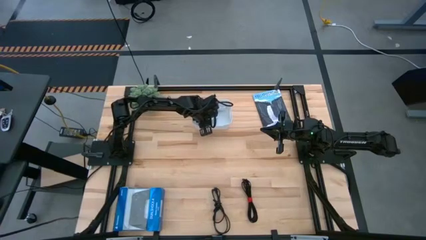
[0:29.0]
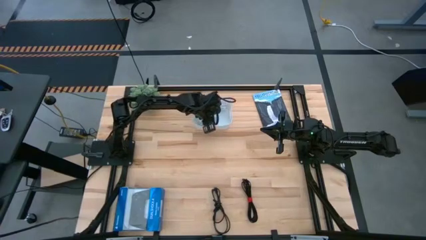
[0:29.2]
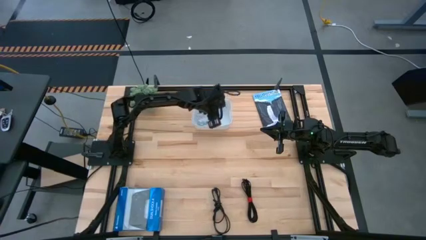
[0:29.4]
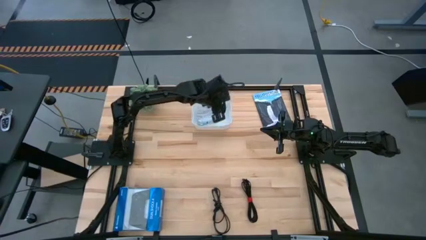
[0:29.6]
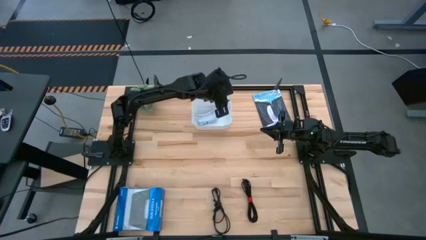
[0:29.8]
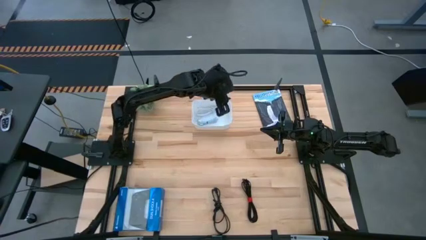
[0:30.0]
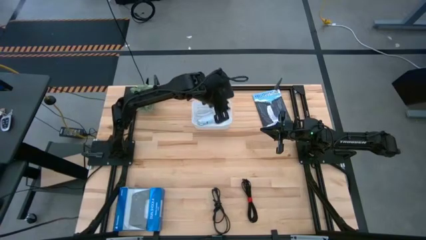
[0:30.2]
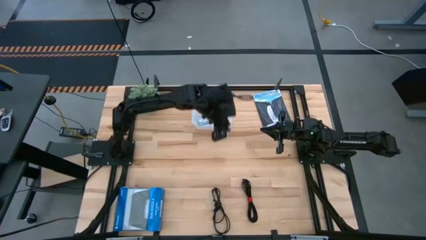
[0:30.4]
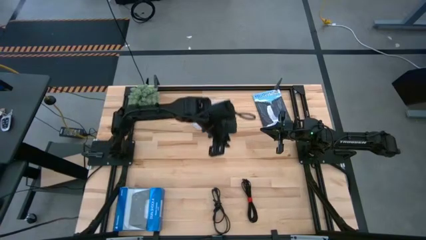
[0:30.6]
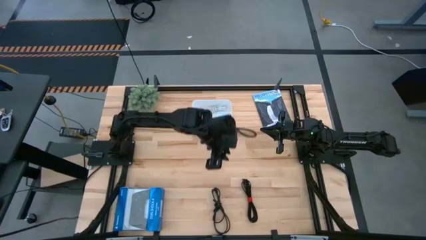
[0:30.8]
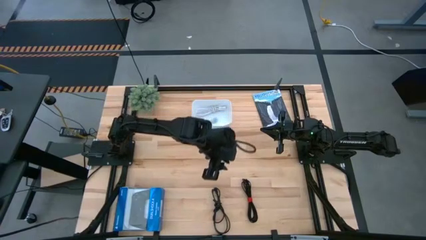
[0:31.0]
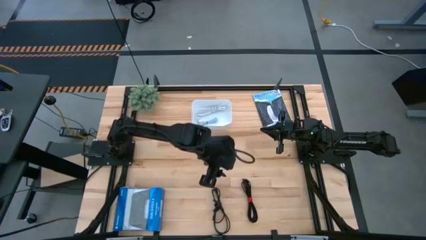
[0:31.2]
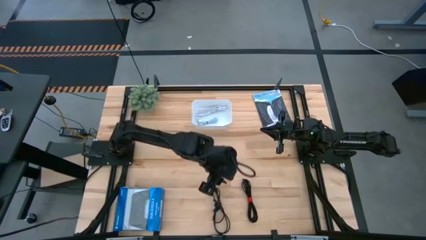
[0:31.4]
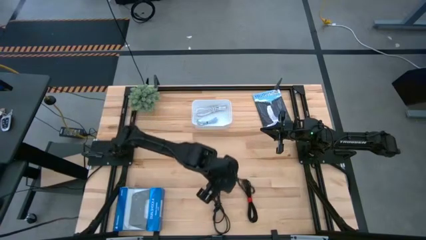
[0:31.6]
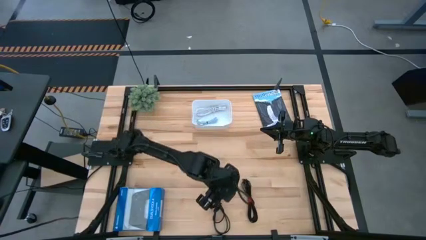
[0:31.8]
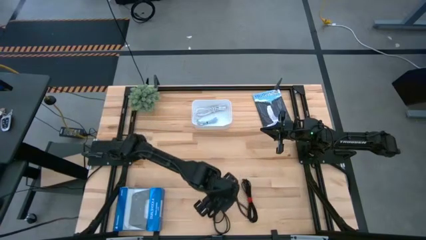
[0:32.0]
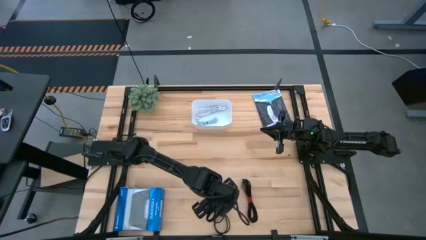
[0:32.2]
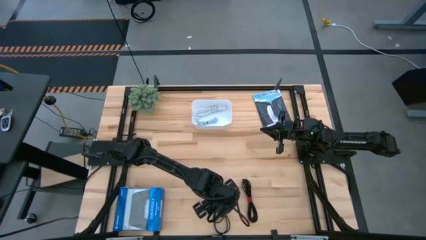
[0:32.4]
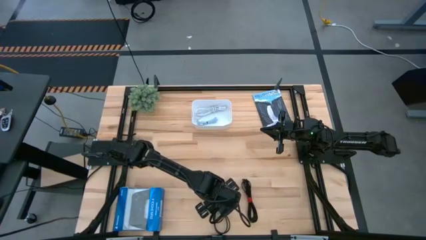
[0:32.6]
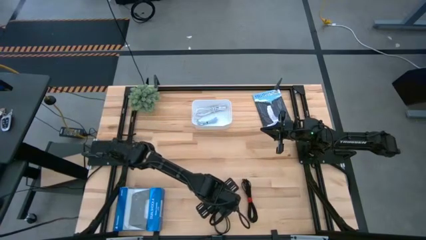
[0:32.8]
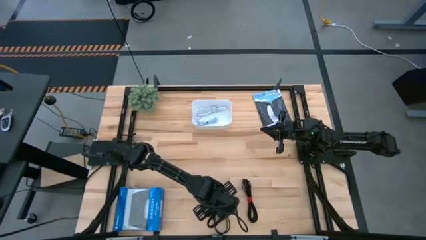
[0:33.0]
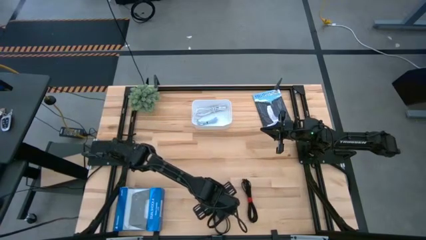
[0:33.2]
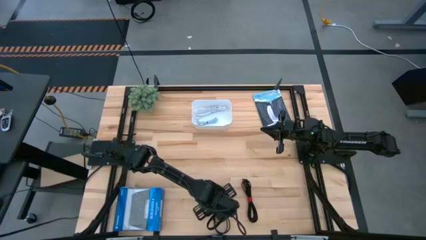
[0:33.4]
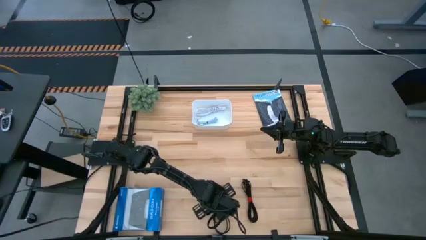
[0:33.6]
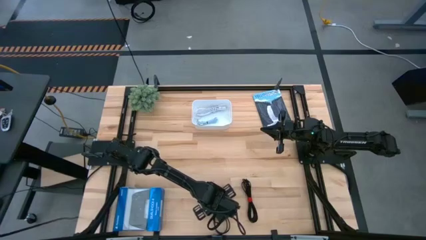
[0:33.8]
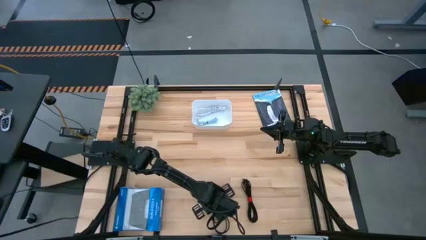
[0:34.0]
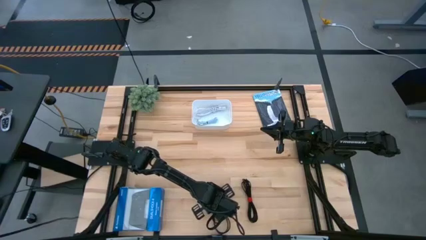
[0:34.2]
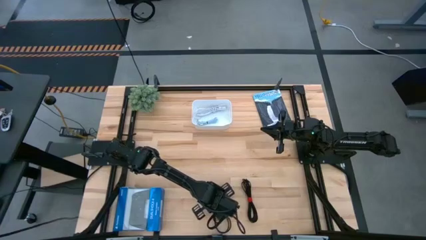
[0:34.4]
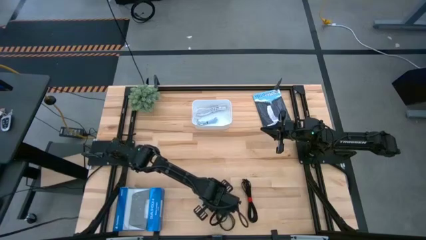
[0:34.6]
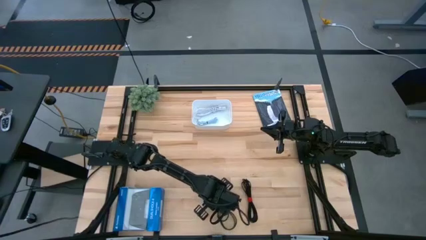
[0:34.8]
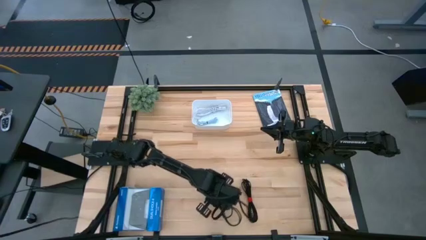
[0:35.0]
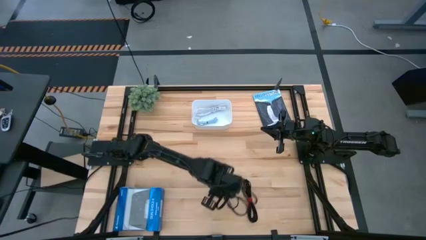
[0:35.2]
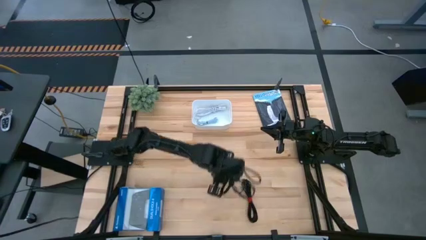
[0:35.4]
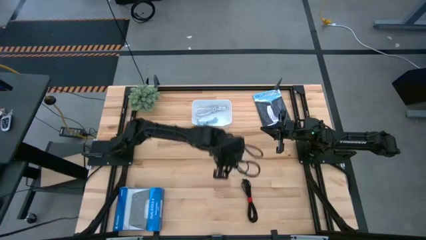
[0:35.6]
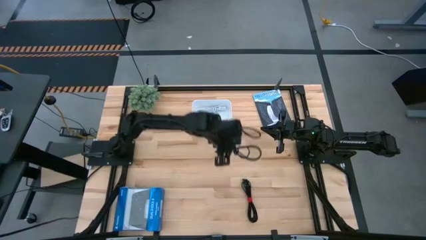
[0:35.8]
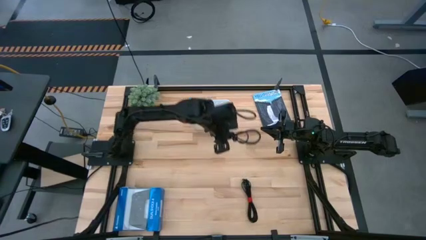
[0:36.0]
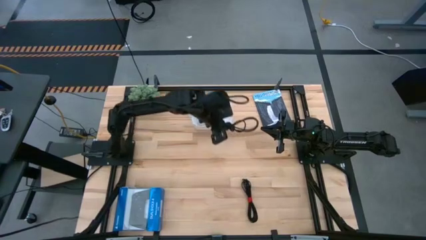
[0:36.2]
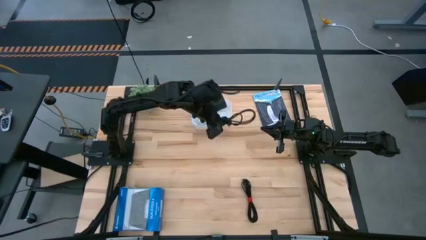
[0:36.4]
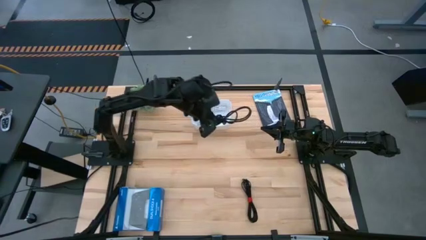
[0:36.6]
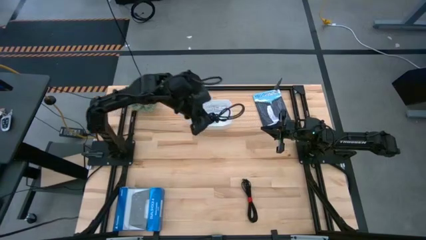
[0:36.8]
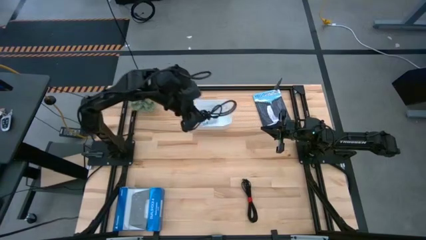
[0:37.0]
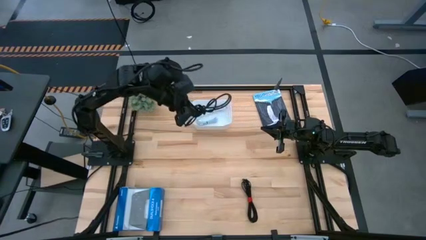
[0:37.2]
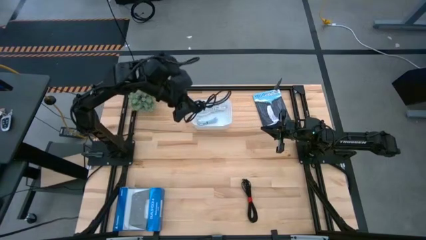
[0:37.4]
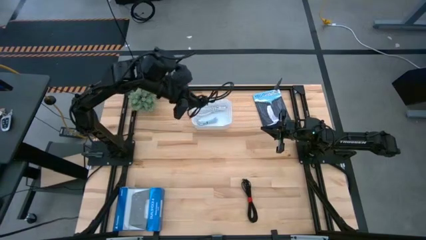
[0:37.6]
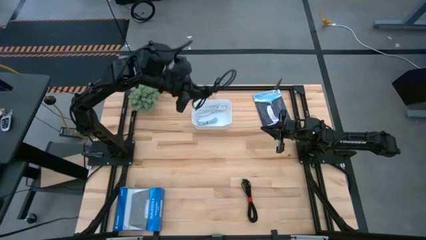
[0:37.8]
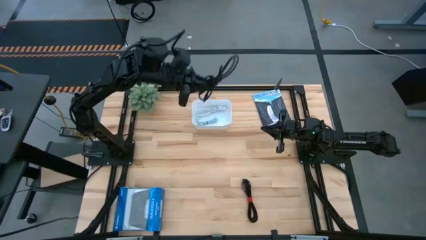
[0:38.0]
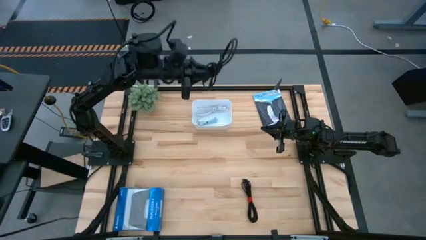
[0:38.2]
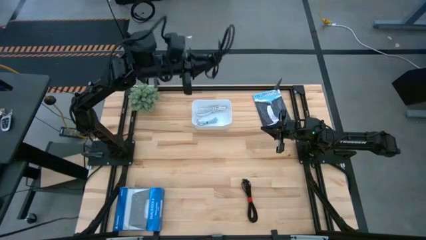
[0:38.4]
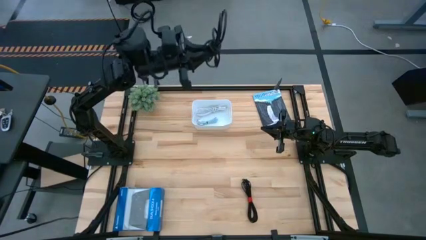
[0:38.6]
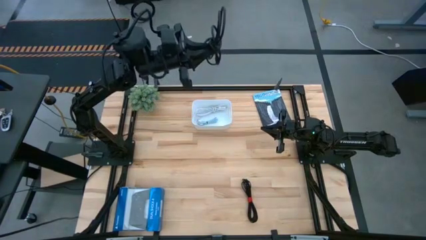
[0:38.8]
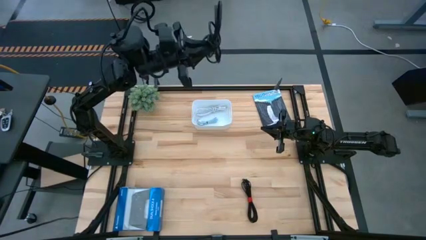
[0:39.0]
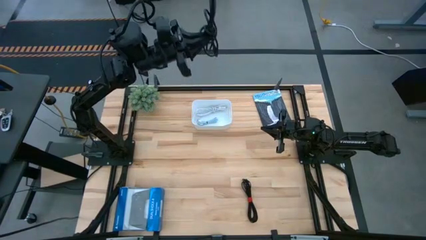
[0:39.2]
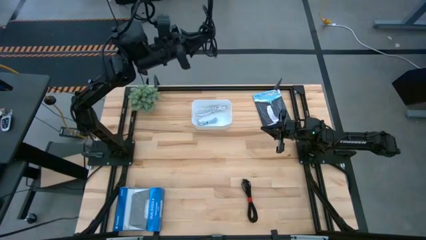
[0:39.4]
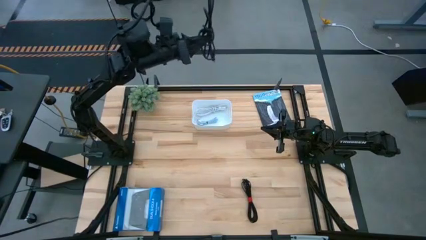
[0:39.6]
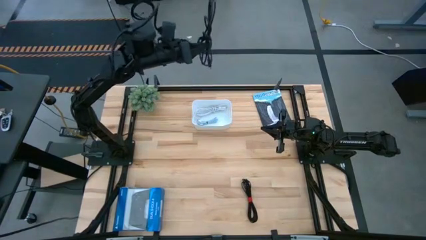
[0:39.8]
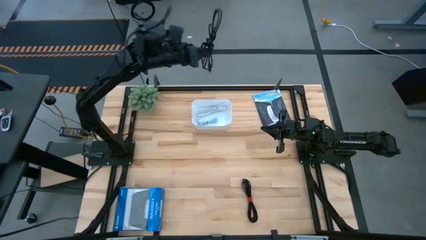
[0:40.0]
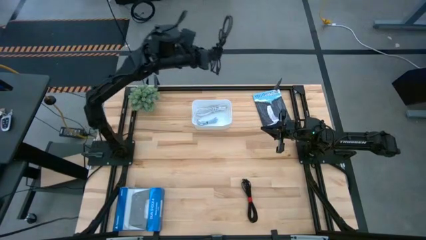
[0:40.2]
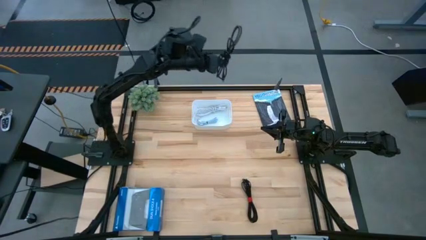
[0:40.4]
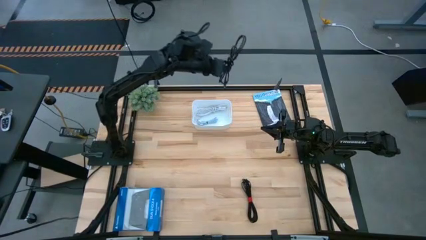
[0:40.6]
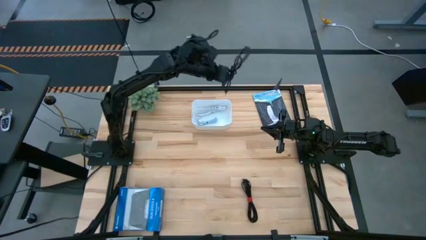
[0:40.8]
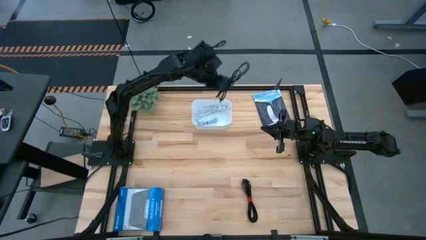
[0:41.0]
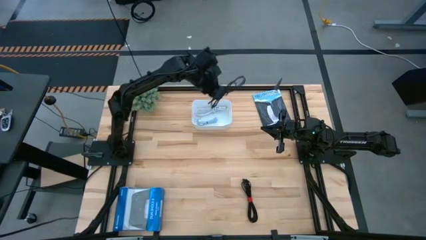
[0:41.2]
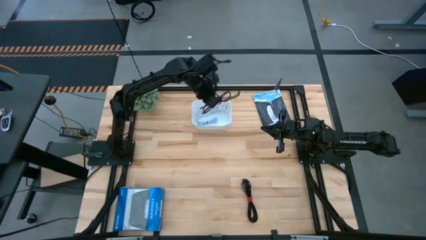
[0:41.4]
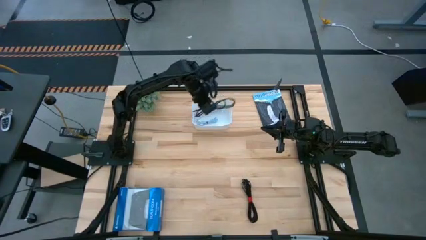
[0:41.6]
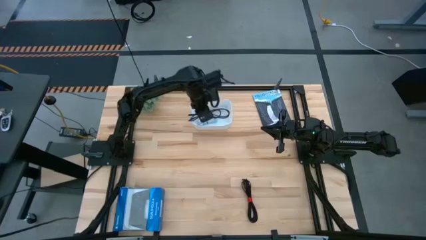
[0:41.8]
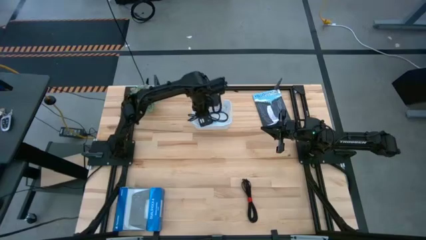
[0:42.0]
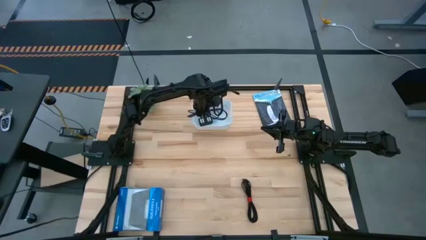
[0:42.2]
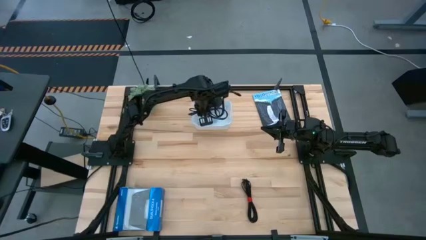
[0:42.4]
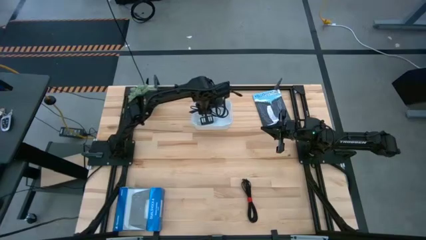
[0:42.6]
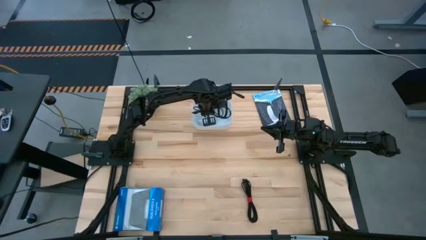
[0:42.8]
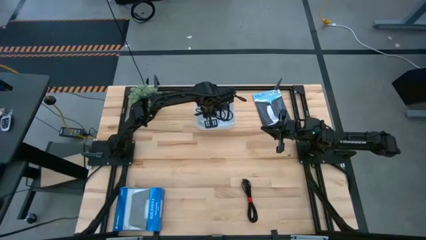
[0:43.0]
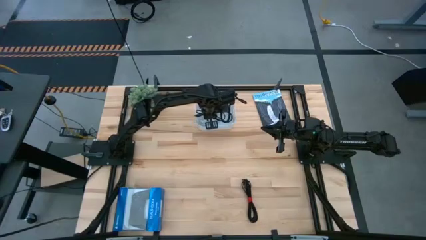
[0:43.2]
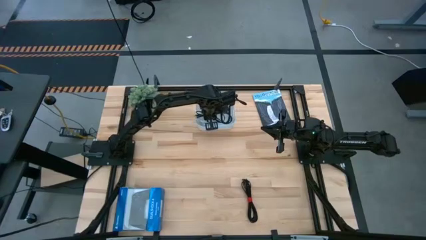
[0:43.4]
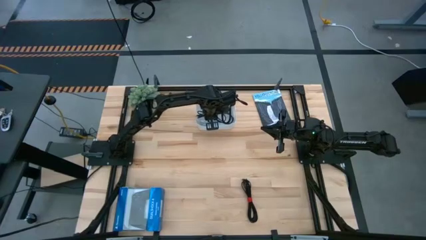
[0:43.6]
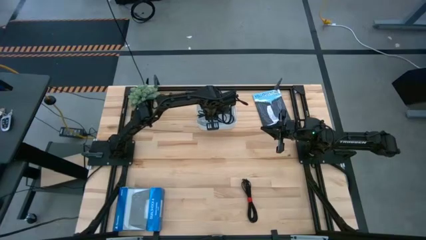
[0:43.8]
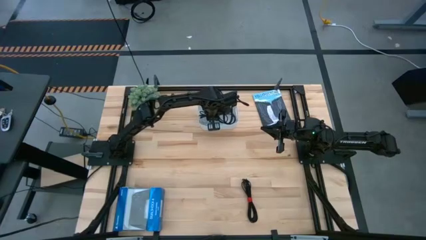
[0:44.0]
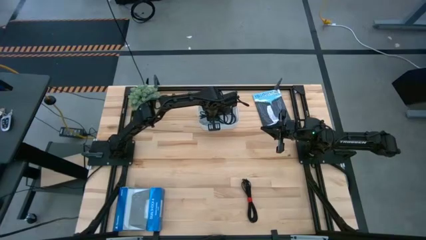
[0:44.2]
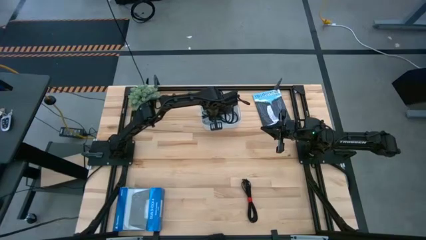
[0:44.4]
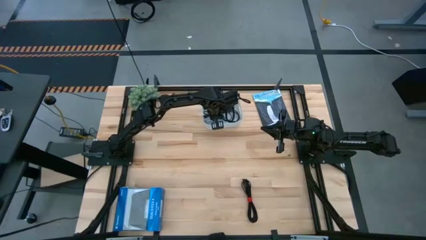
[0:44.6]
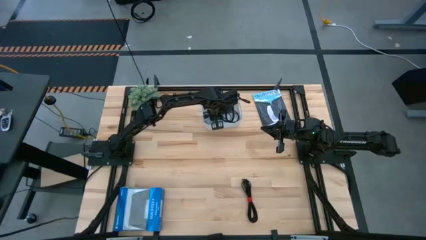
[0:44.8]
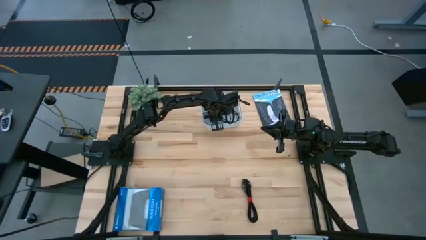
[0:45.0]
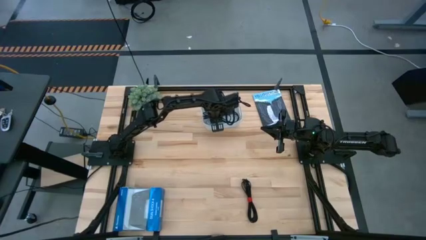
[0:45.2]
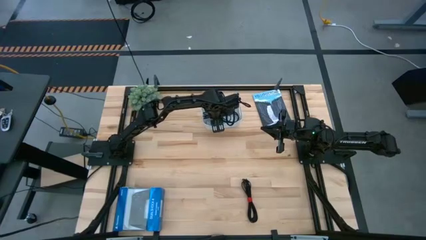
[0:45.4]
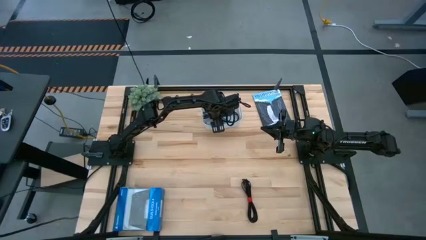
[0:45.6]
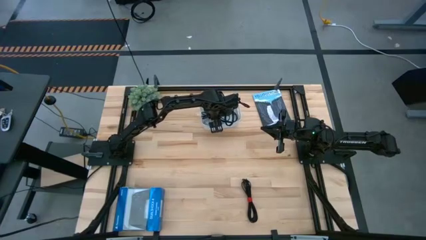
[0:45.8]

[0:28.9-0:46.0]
Task: Pick and place USB-C Cables
Put the left black charger cable into the white bin
